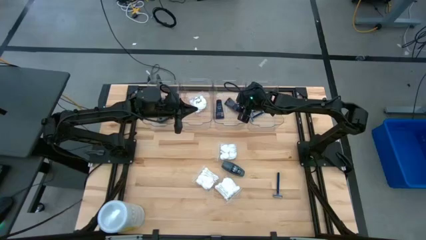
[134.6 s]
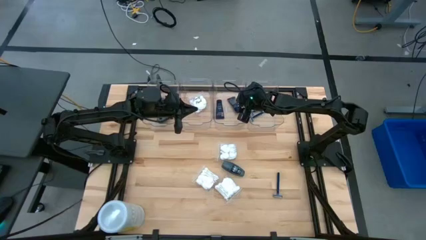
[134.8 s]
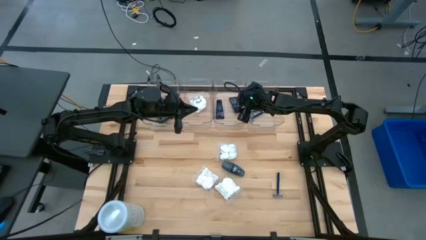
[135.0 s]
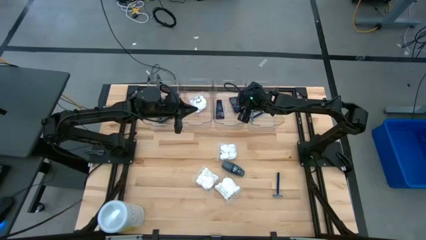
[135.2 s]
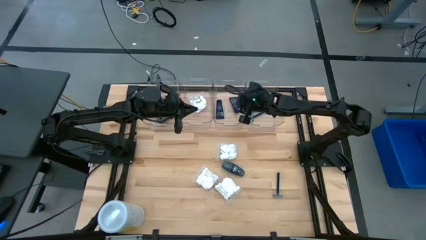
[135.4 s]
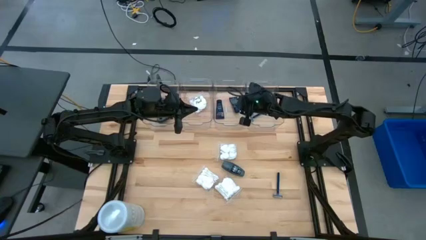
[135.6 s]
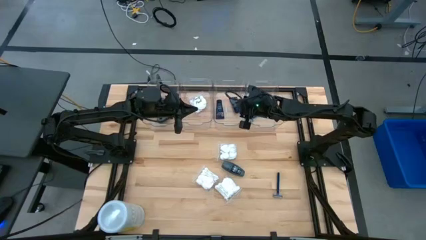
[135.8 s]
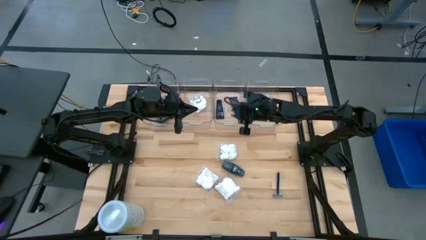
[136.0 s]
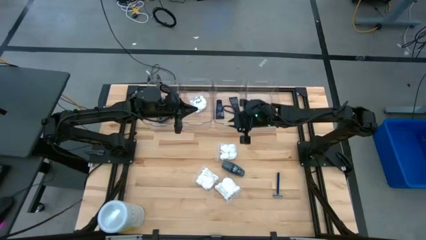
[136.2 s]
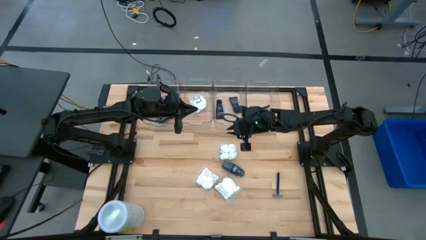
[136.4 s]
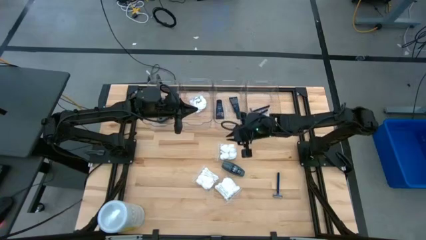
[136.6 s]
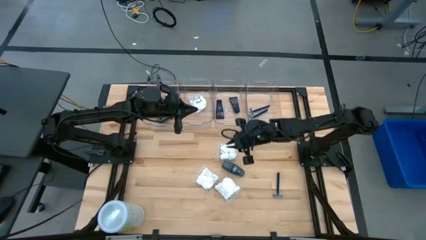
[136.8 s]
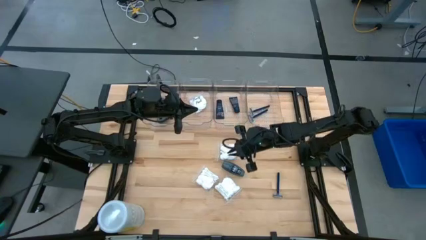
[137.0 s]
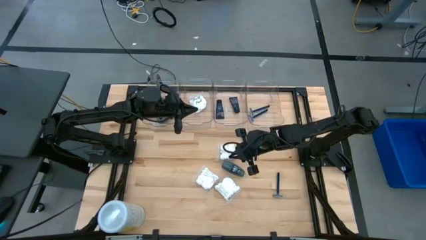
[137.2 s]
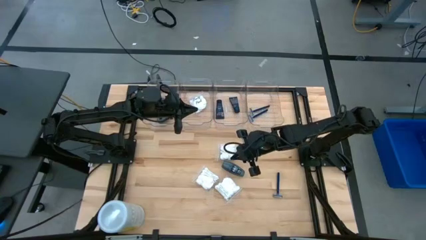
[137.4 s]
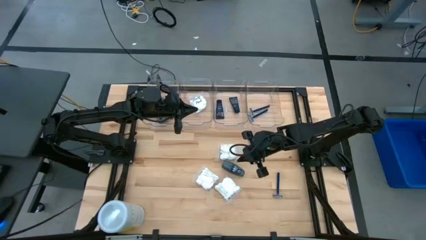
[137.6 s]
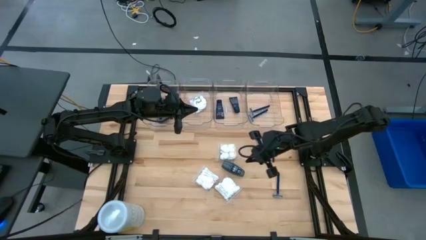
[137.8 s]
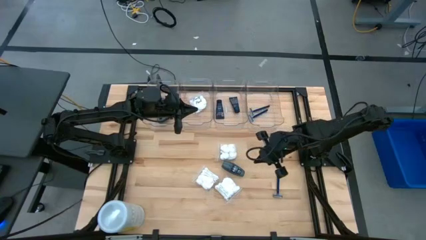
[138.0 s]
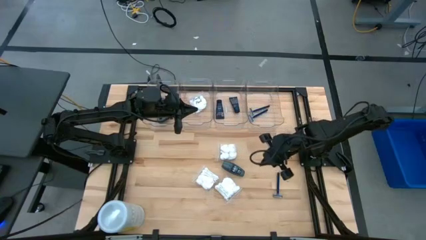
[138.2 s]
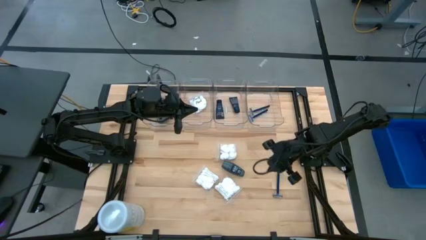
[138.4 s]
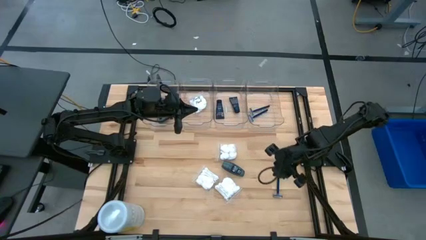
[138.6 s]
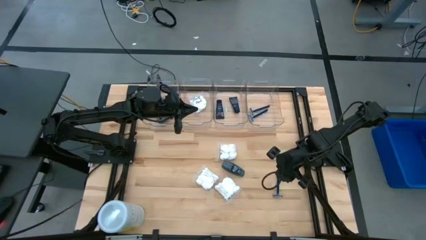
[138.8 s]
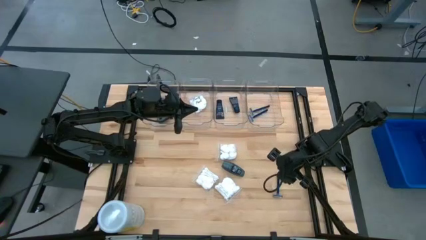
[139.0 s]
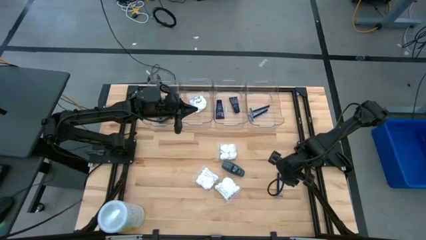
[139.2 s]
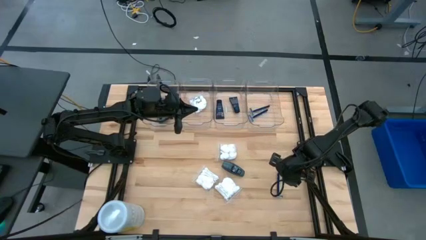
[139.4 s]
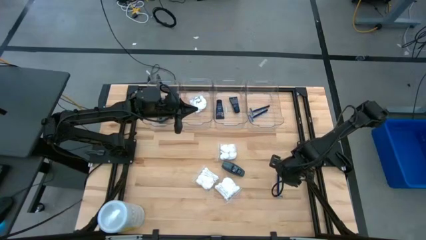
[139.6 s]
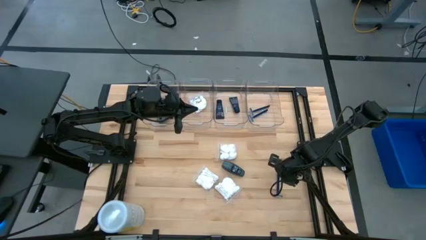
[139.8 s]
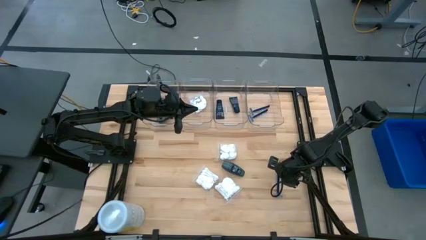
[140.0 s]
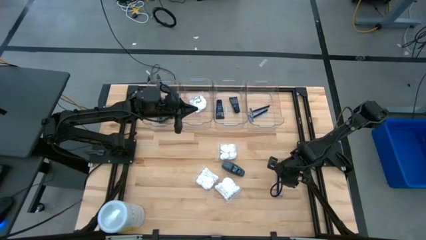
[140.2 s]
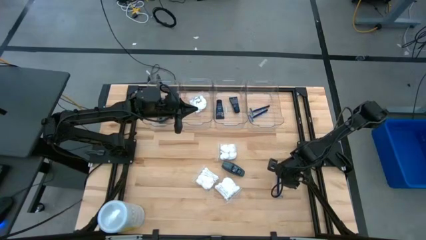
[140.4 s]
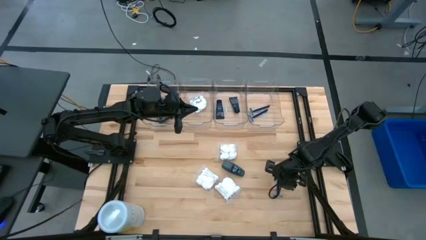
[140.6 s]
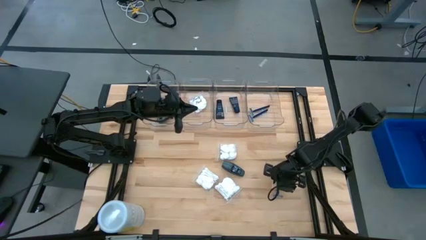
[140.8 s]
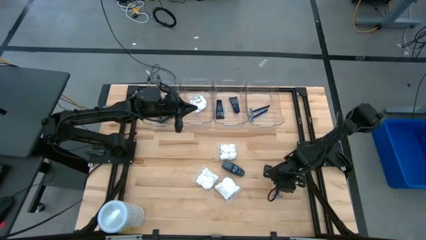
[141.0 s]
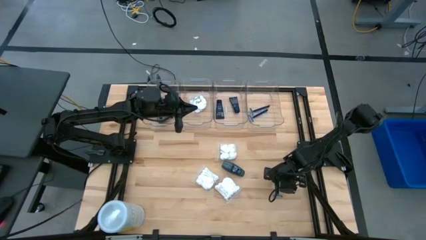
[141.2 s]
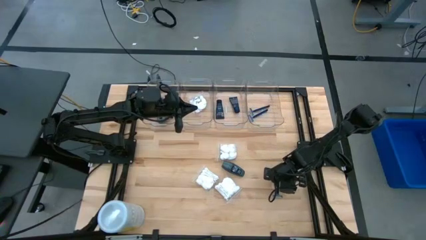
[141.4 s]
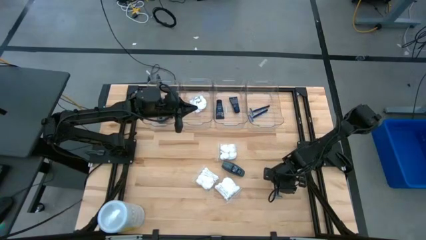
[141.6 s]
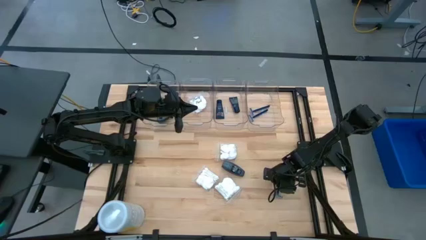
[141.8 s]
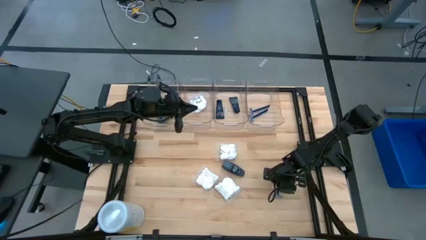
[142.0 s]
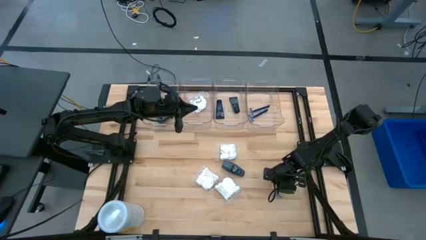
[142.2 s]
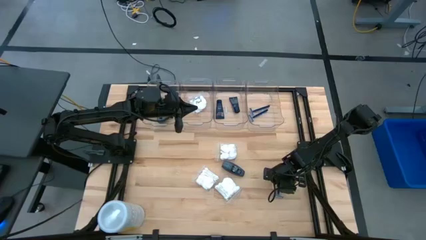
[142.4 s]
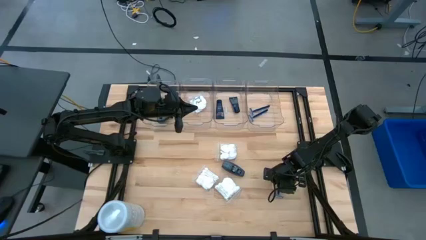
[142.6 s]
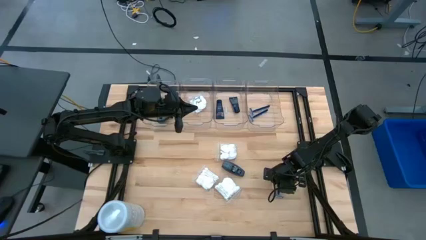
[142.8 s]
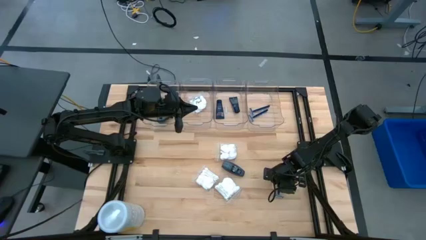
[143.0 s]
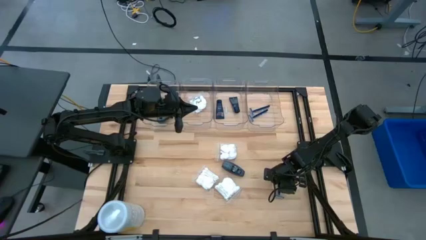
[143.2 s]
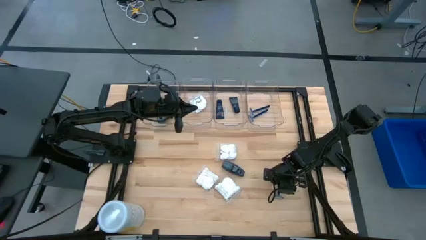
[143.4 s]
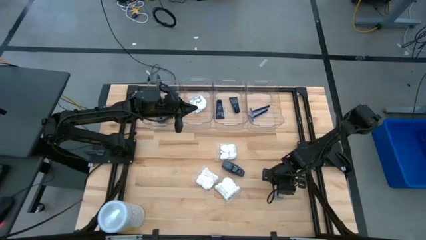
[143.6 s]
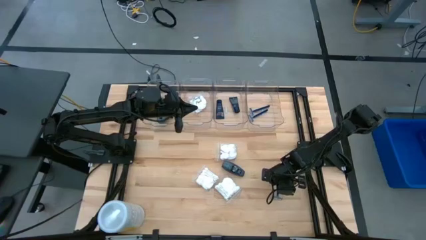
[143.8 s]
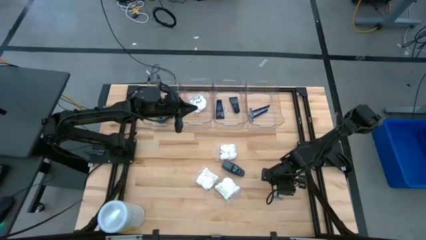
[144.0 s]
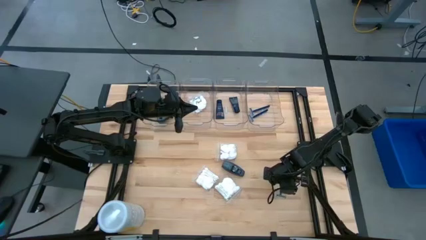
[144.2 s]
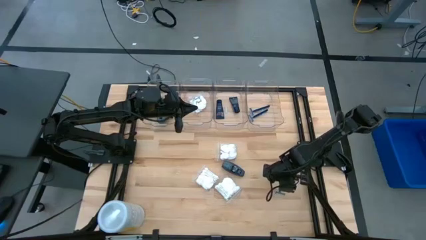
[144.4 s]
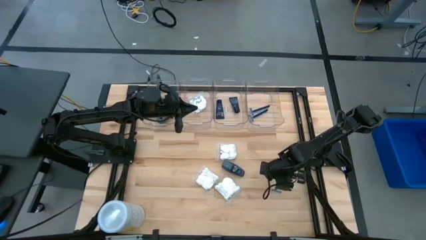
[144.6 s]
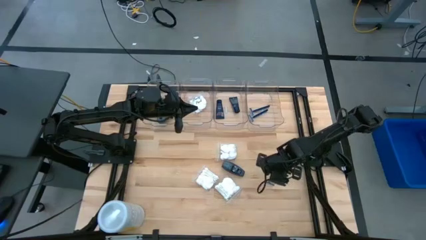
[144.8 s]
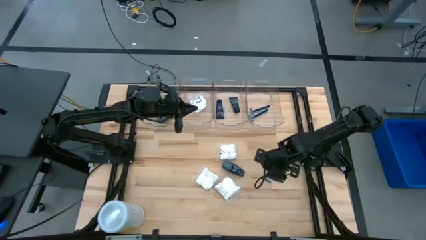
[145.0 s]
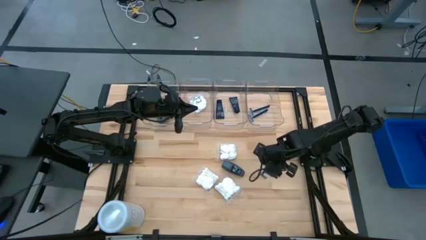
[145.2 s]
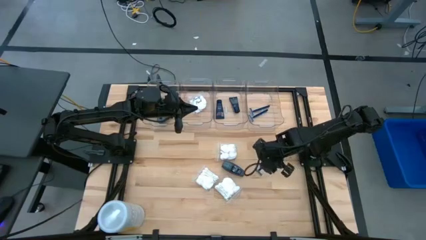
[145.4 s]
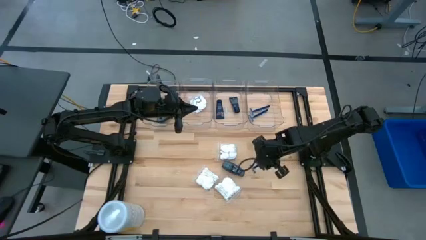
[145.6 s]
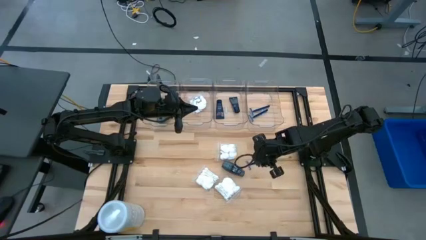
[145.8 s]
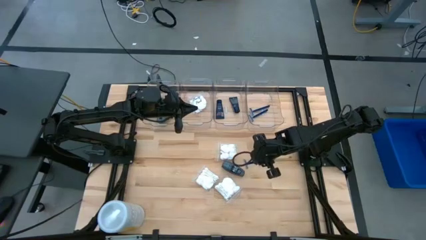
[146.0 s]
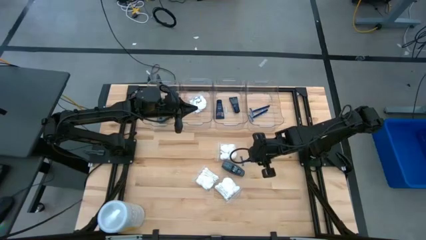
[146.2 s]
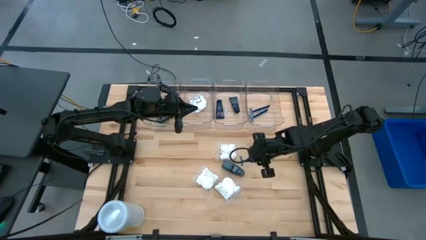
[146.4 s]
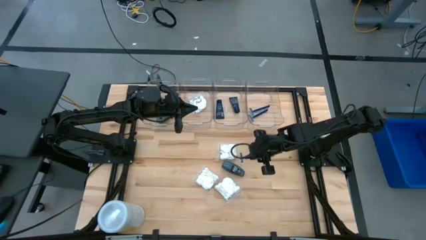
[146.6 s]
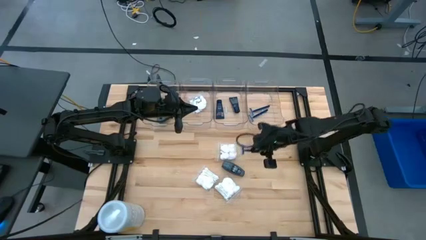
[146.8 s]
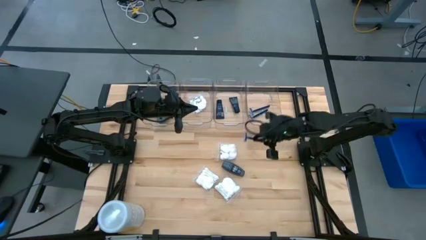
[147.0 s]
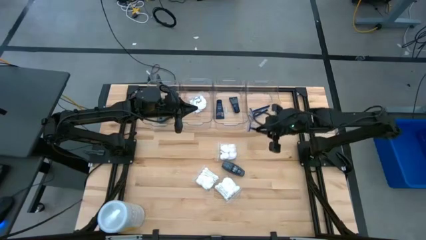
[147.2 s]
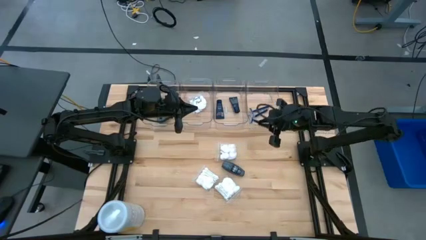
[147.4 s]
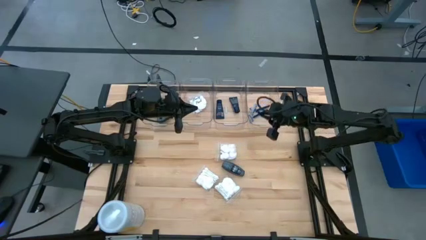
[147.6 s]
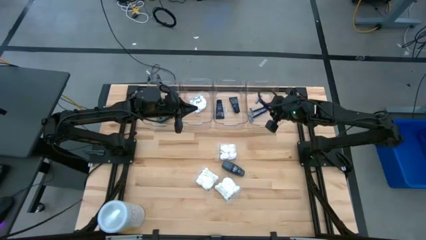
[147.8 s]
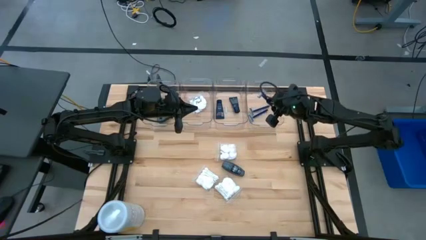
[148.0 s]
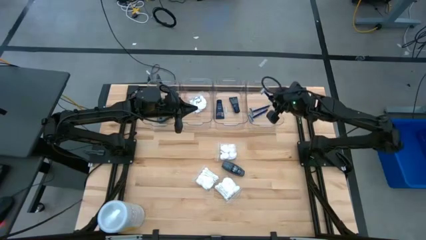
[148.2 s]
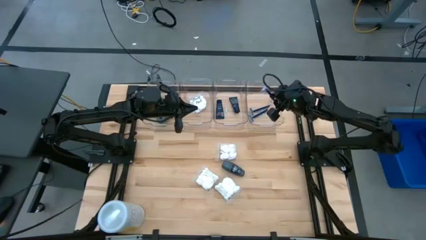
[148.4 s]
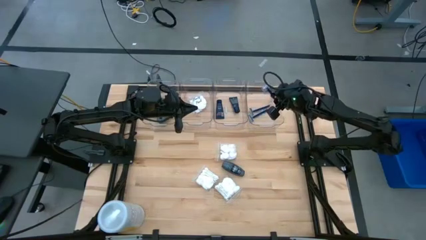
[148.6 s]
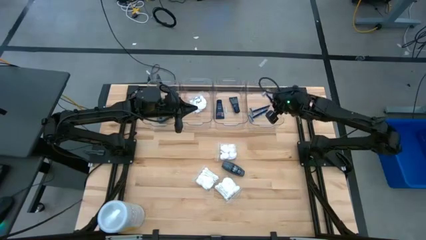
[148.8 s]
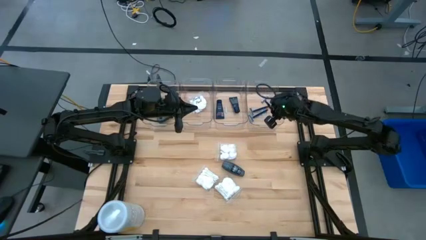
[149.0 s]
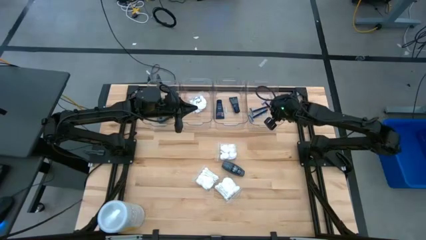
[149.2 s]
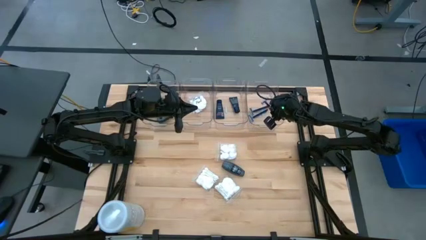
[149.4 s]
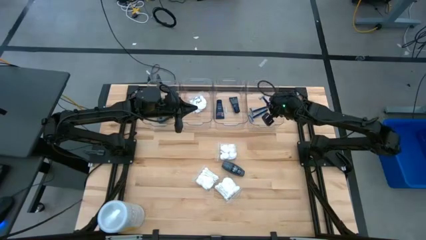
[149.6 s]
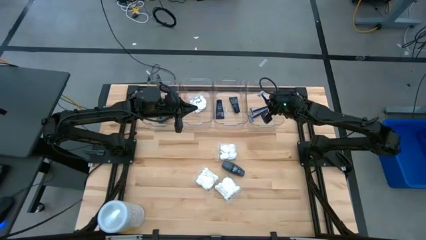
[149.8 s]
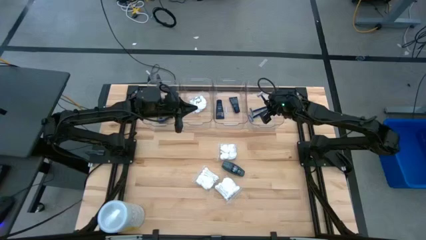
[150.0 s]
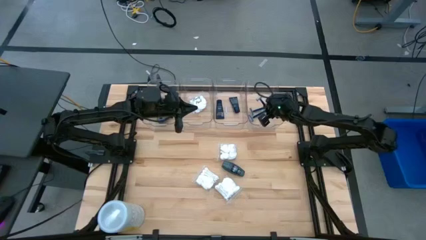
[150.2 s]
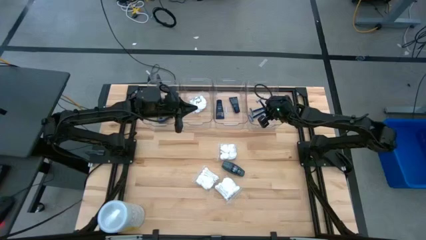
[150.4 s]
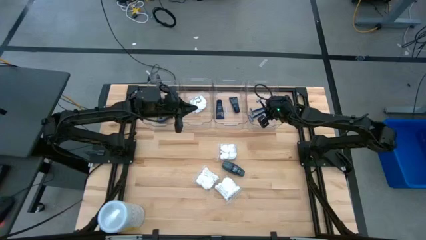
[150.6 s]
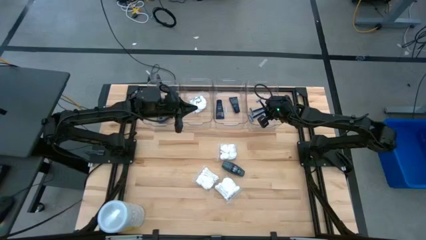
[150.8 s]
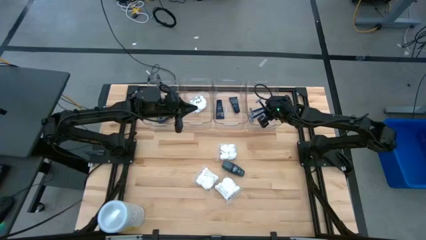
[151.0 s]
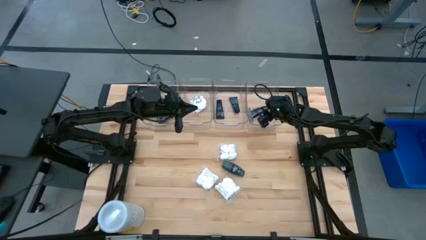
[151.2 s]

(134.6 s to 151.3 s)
Task: Pick & Place Travel size toiletries
Put the blue razor into the right transparent bin

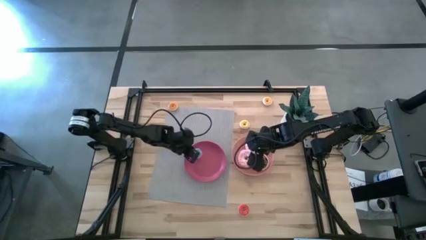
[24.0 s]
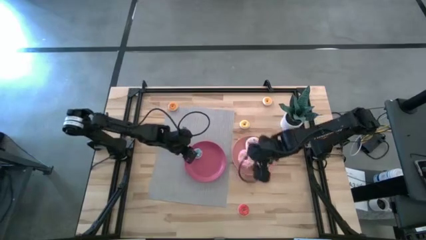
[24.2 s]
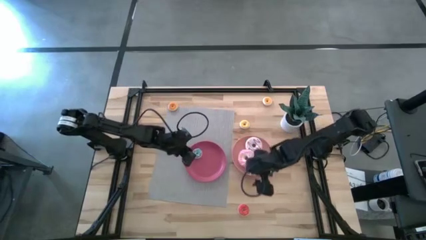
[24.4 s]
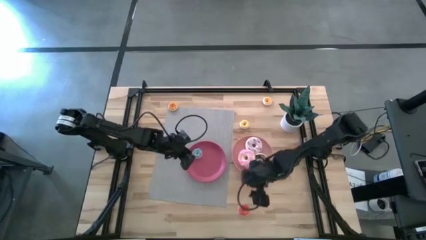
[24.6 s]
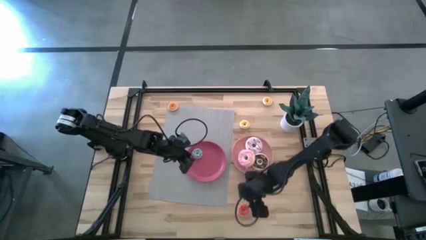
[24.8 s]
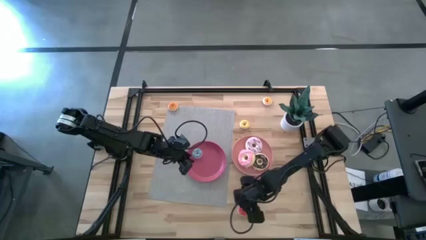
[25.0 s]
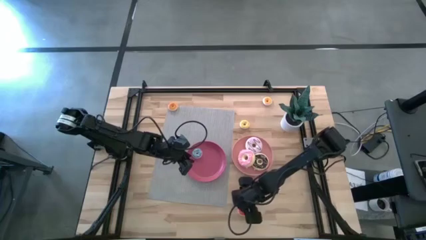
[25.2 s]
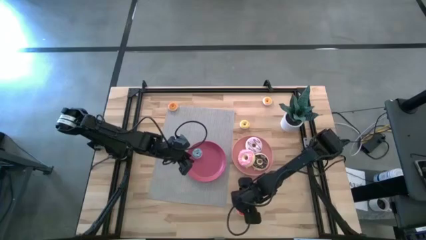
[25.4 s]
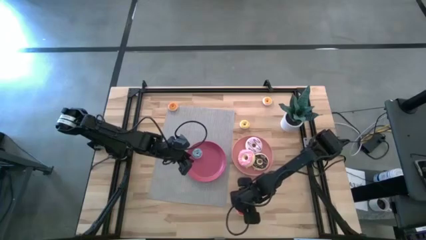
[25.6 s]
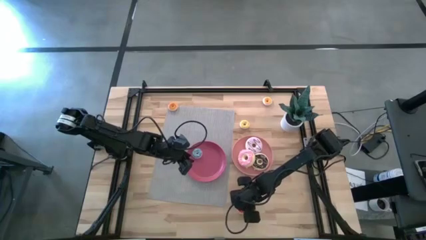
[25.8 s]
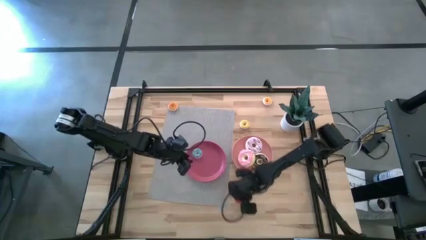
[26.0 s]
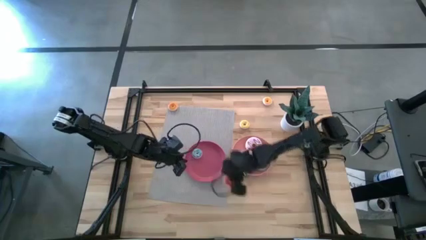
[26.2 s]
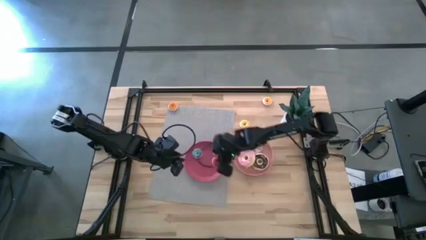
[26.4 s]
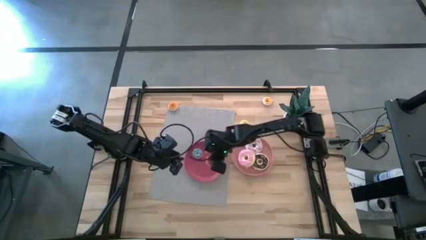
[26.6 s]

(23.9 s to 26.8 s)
Task: Pick & Place donuts
Put the small red donut on the light pink plate
